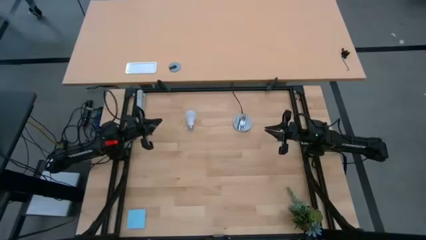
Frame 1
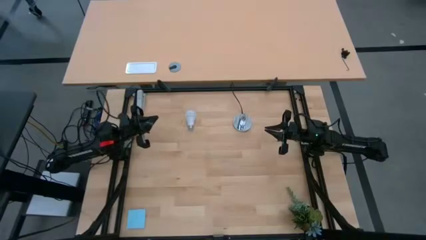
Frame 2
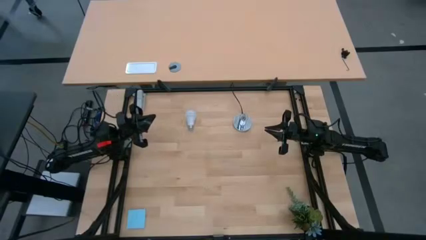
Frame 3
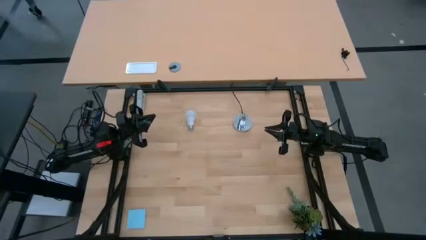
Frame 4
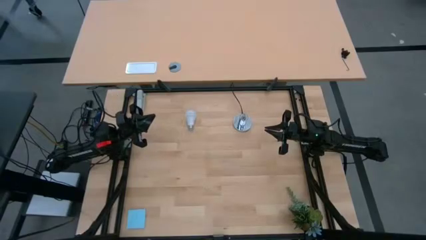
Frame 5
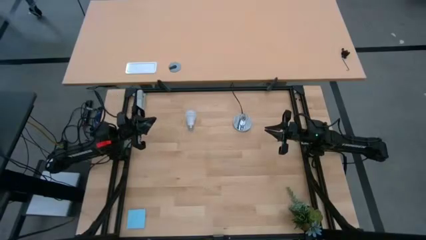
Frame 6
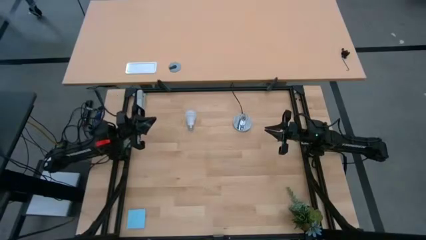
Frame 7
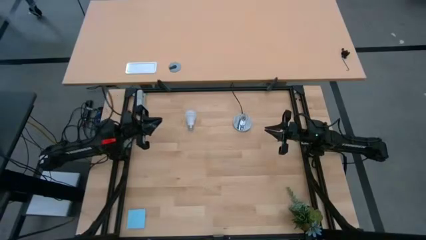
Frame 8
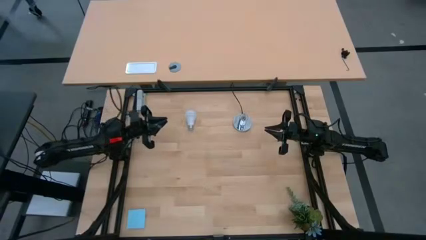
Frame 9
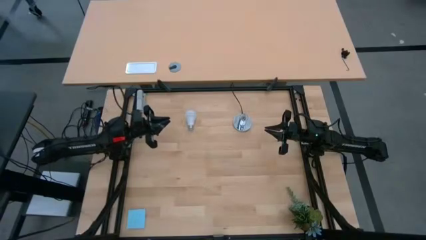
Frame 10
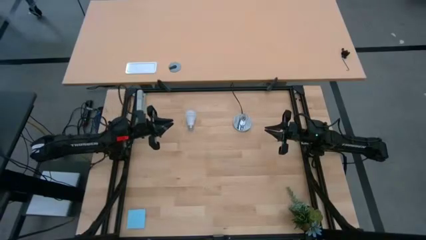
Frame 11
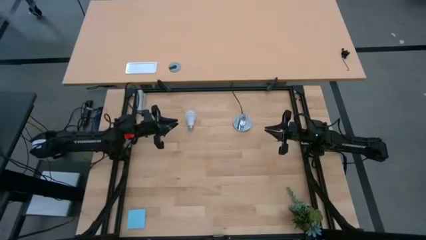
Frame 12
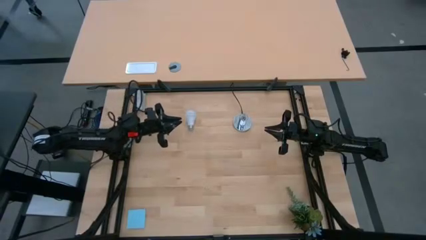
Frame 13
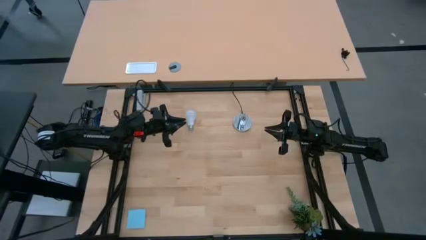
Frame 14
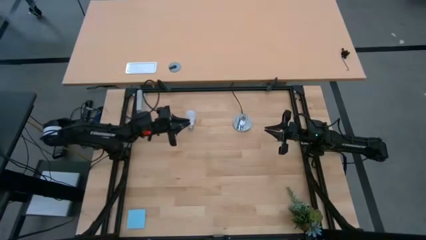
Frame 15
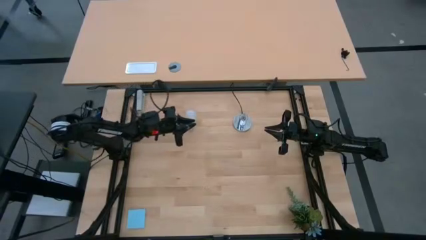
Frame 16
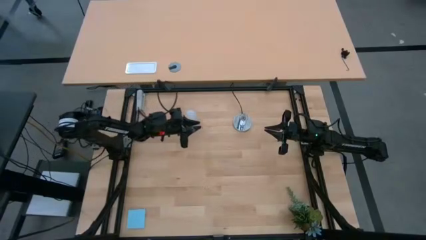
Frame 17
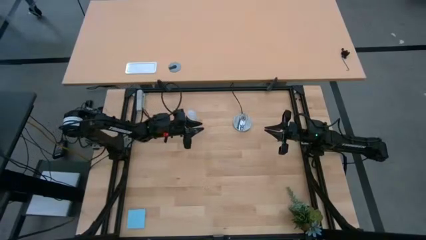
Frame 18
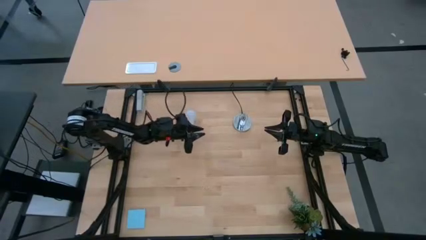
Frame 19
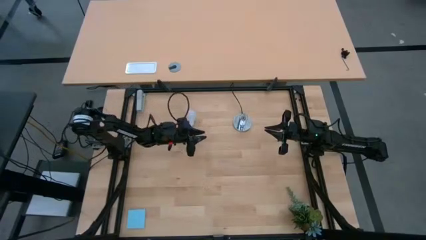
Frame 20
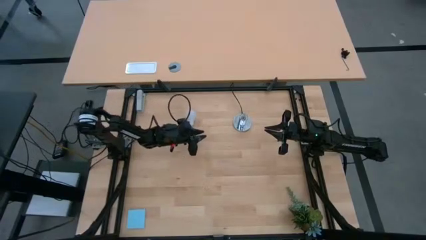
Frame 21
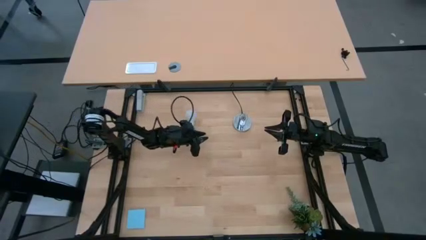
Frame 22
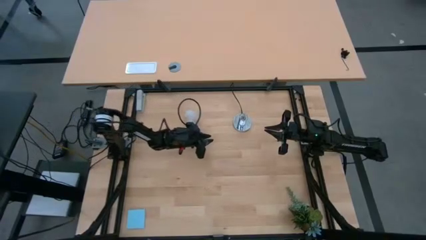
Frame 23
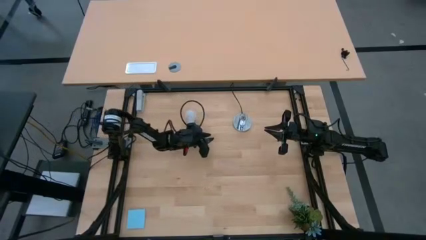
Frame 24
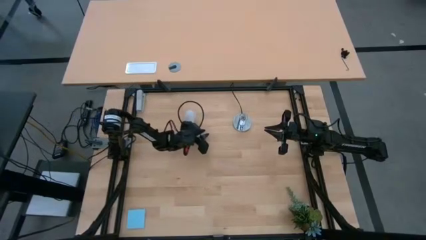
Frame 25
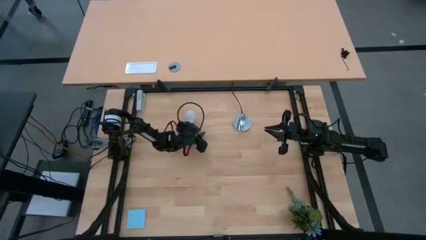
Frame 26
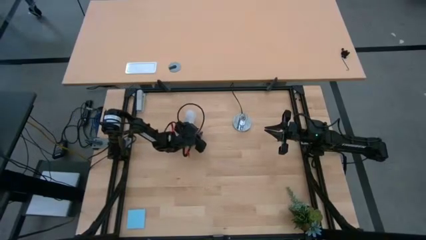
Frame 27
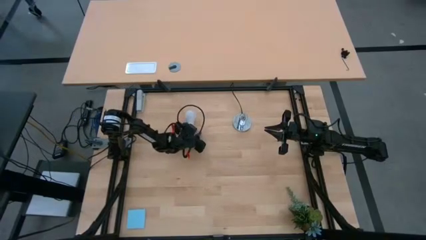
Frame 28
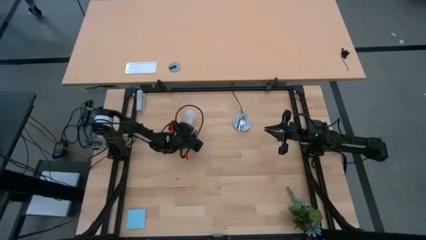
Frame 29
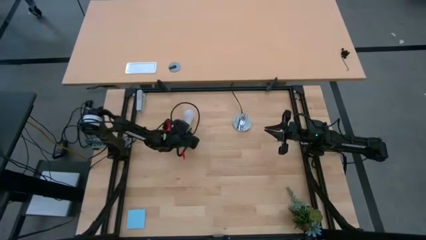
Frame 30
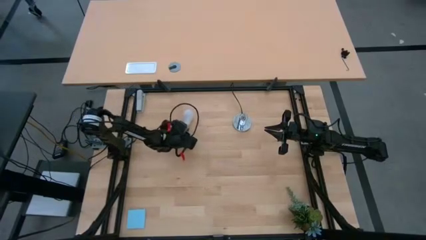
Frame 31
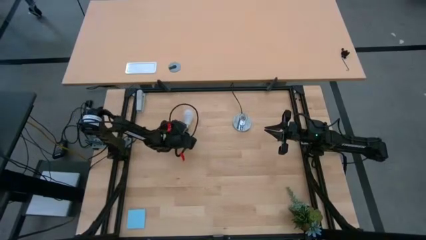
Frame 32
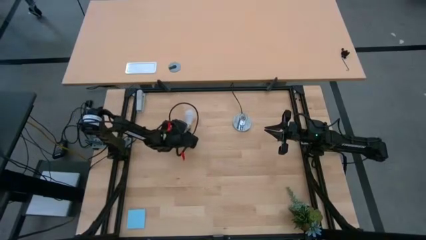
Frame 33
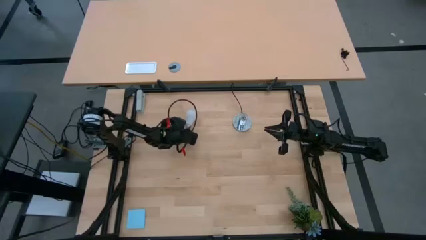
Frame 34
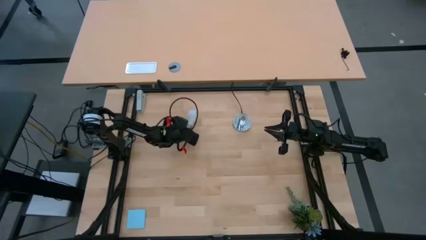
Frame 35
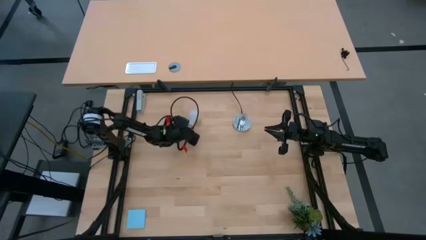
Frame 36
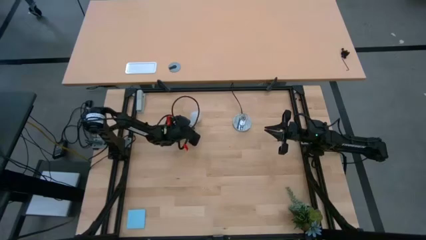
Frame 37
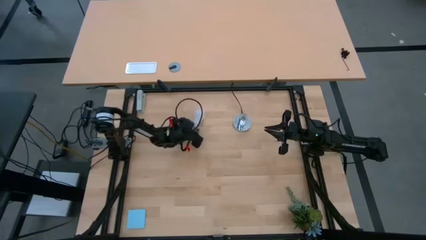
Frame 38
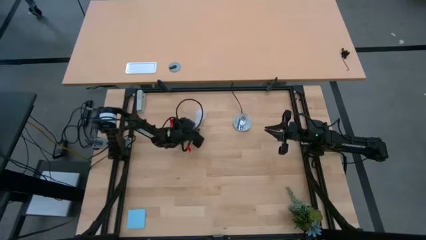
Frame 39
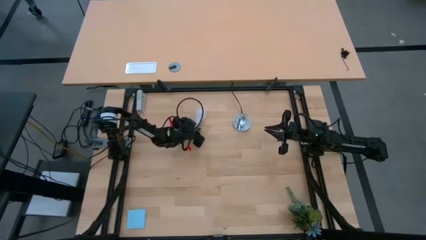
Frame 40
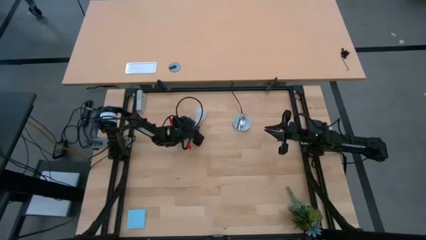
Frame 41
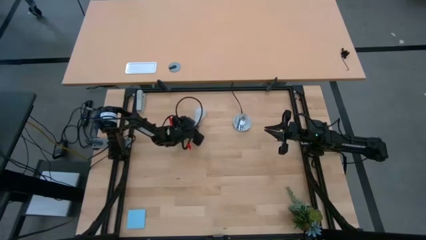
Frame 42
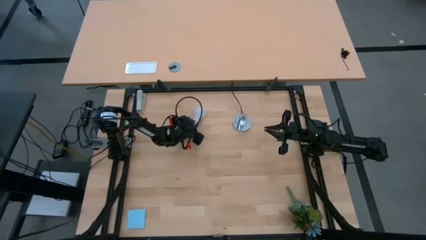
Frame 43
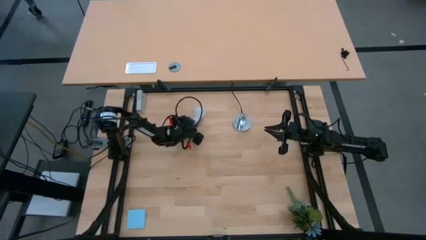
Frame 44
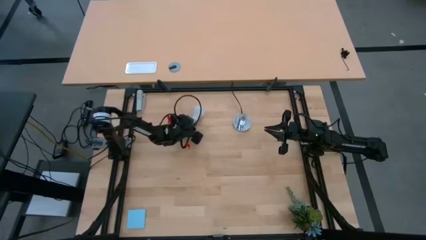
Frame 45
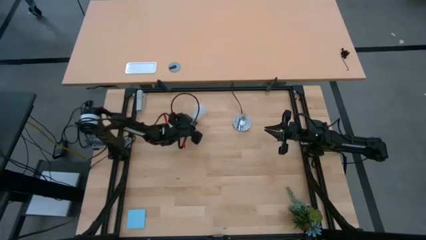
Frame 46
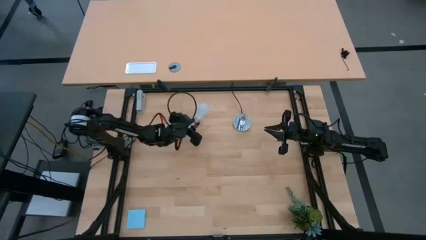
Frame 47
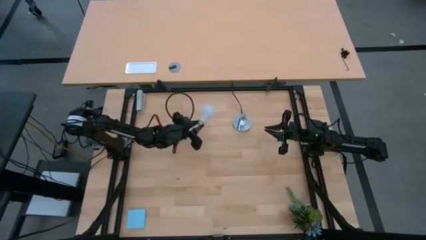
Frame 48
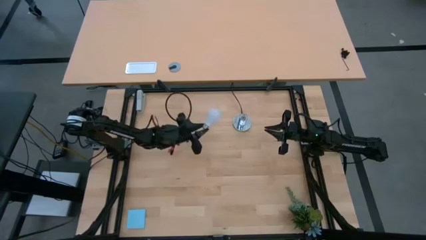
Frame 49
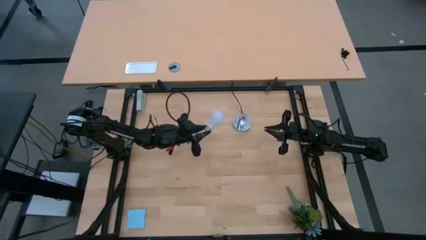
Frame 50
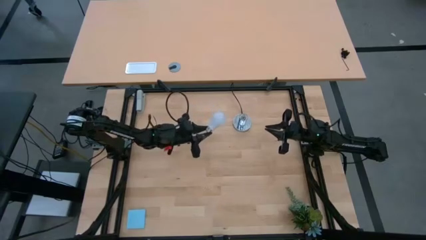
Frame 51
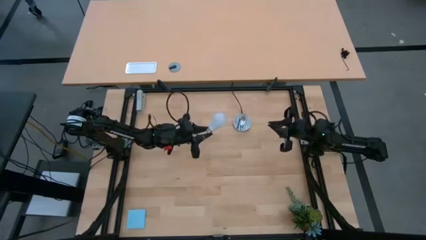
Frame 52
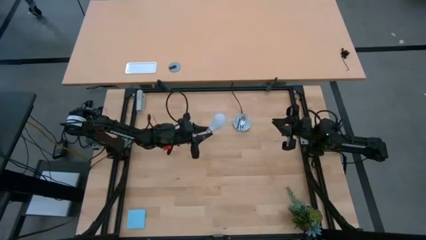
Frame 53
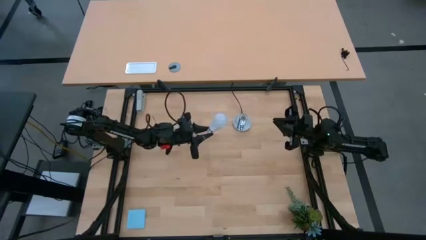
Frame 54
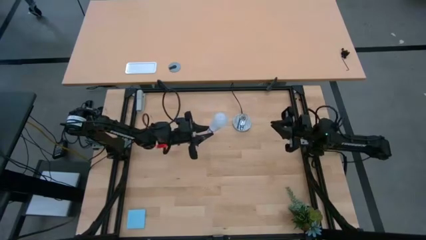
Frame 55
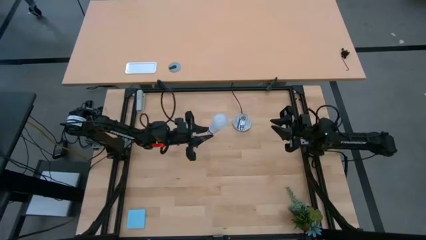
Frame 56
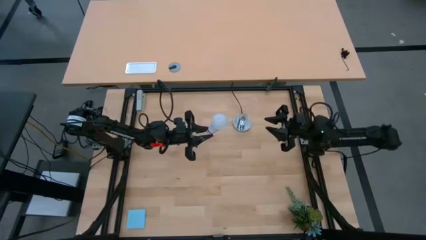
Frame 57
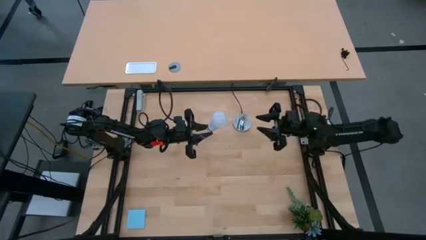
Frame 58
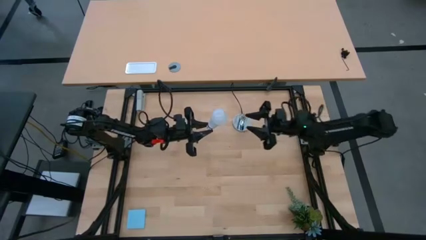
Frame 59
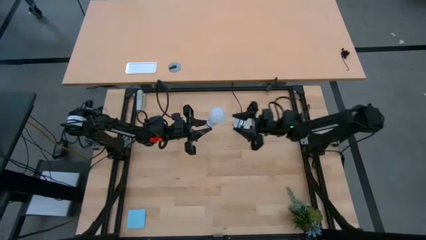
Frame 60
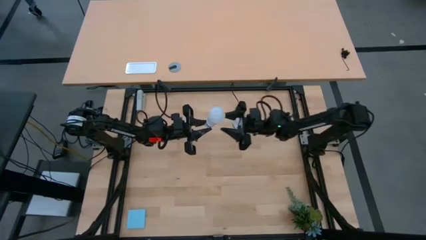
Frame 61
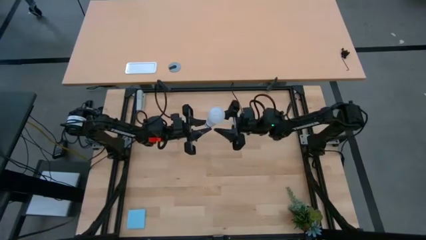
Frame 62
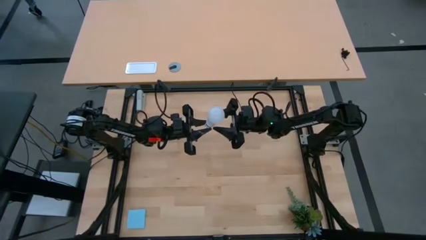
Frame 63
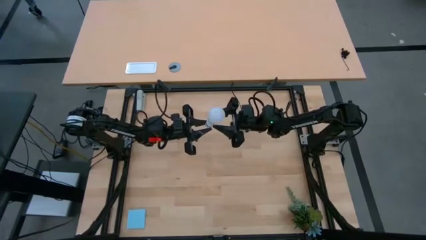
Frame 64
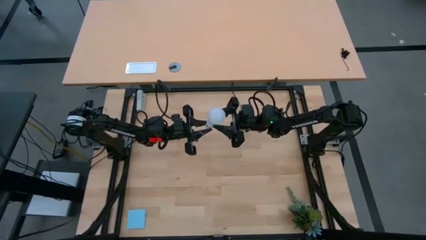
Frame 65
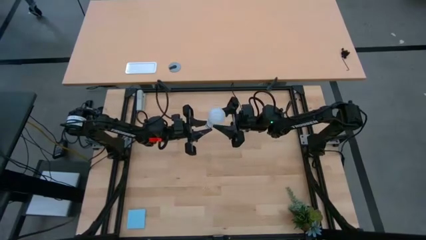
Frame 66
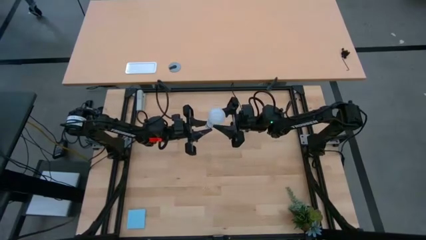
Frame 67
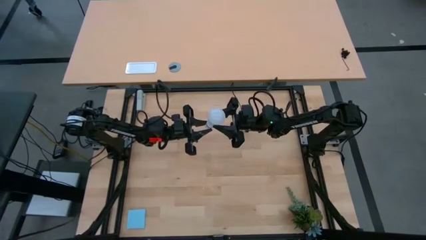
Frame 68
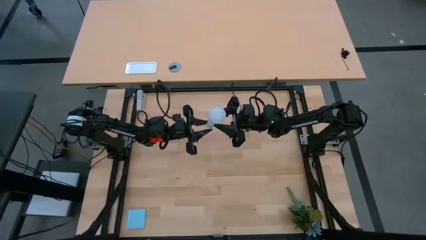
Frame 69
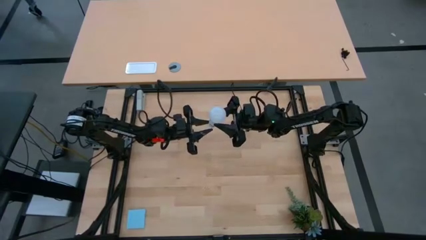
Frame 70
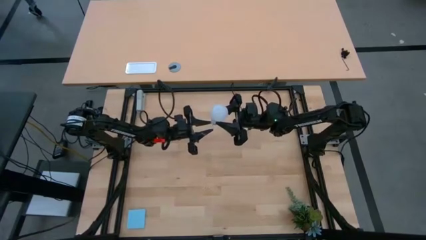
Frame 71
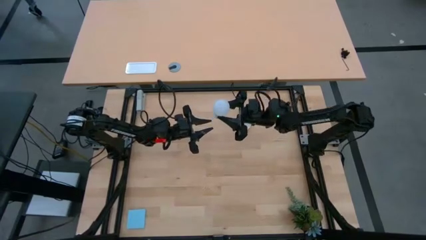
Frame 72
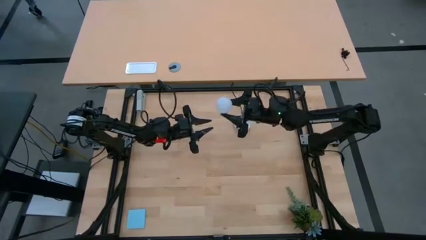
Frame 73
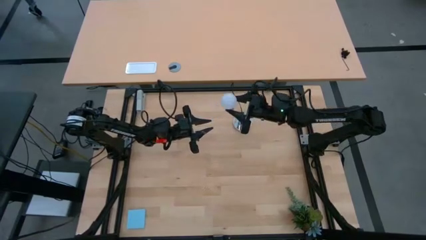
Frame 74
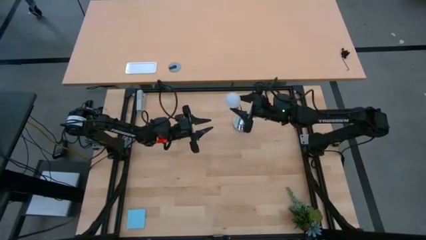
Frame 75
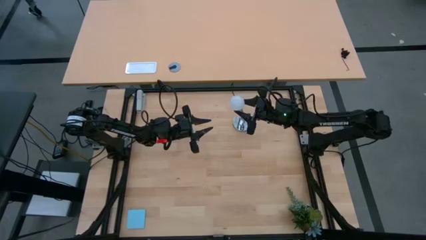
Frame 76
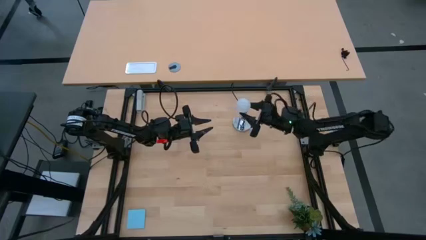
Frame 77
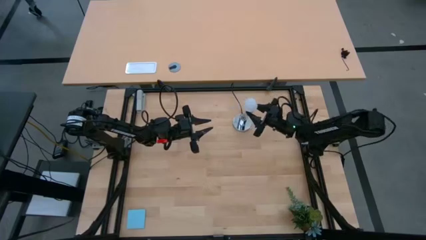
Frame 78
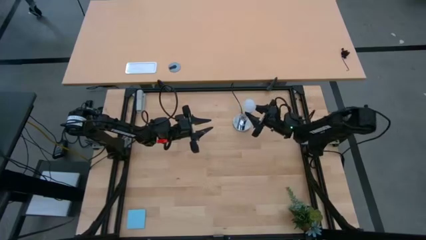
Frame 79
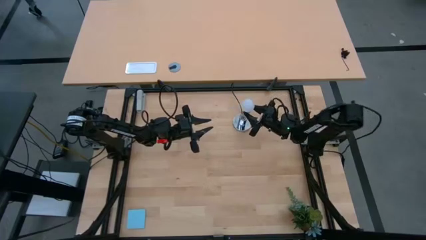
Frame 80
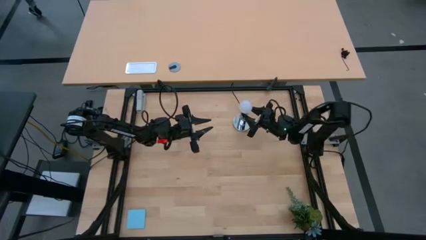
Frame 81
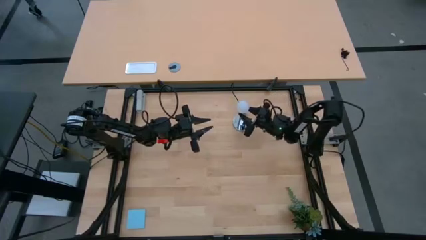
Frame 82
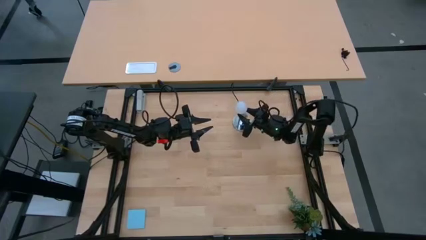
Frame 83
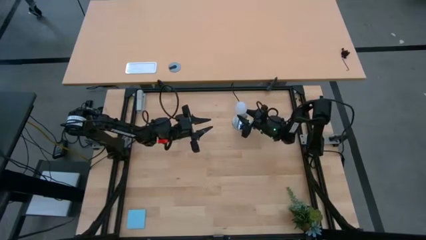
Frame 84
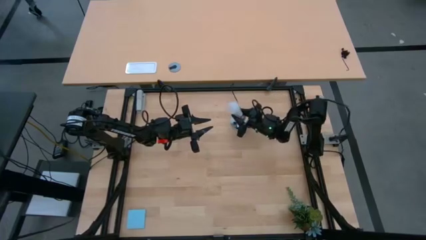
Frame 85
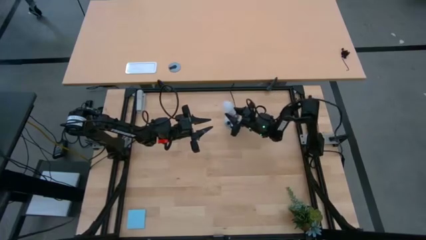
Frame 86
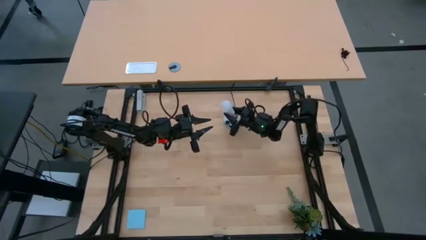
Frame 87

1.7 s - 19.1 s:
Task: Screw lightbulb
Insert the white lightbulb into the silver lamp
